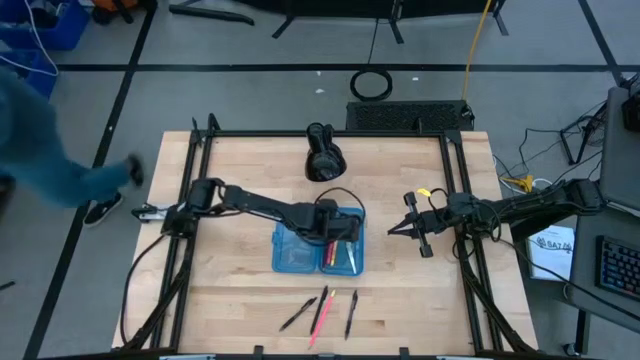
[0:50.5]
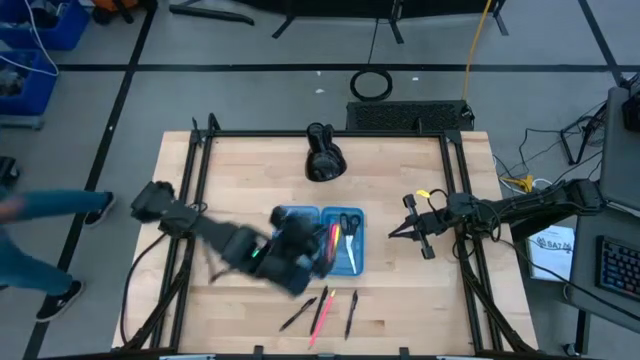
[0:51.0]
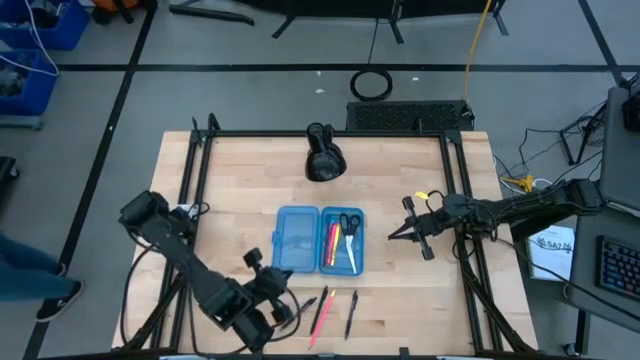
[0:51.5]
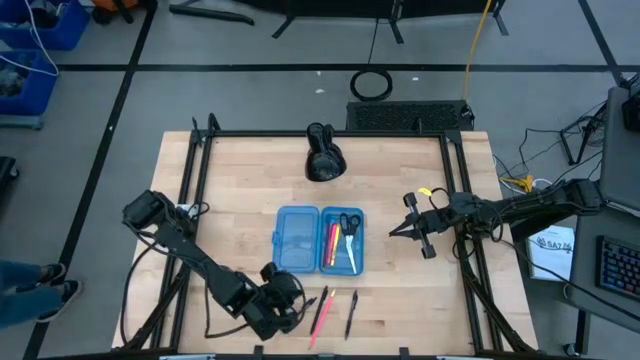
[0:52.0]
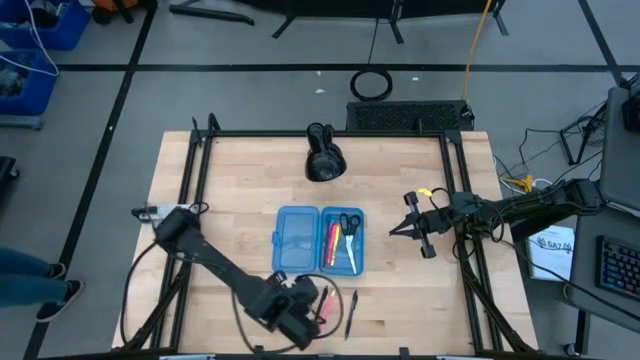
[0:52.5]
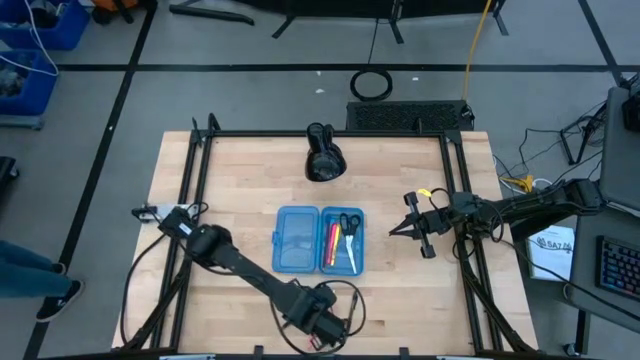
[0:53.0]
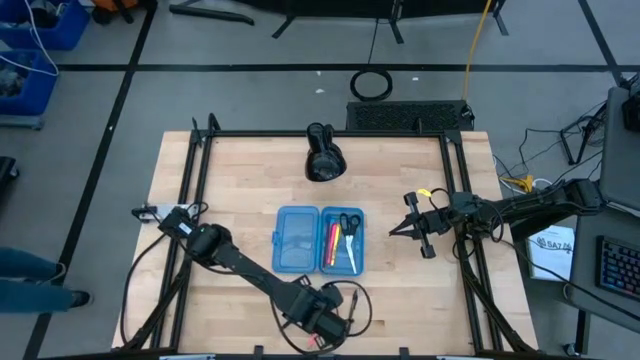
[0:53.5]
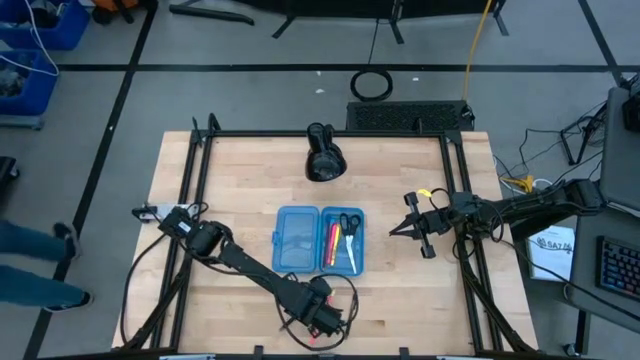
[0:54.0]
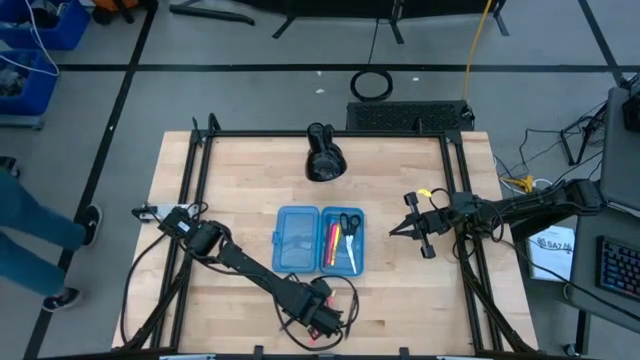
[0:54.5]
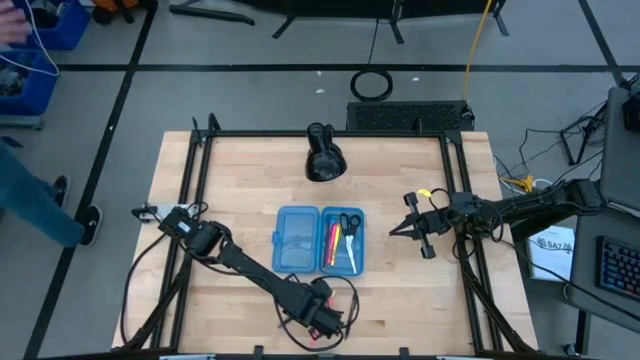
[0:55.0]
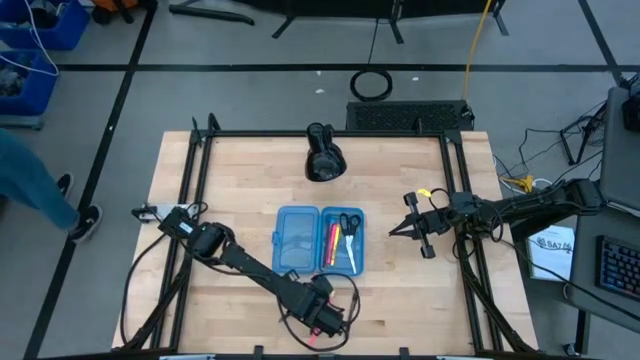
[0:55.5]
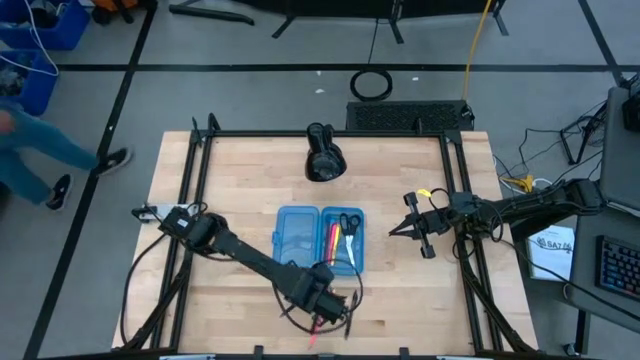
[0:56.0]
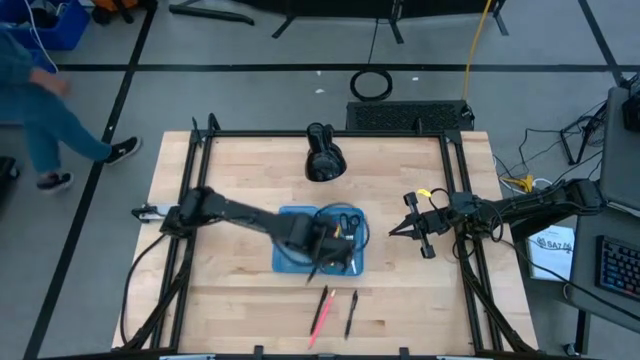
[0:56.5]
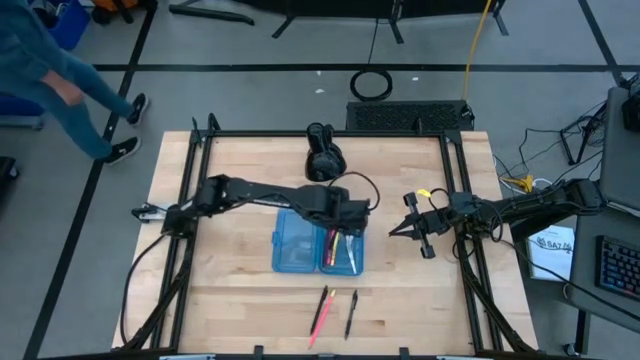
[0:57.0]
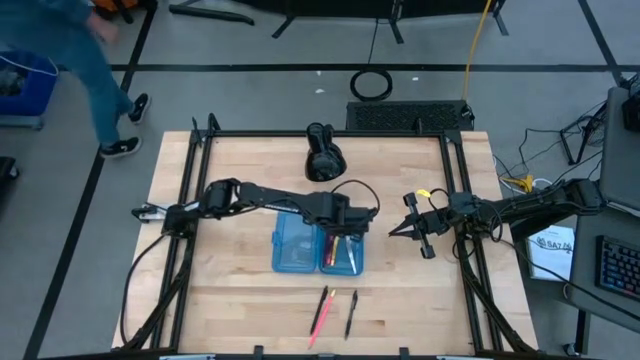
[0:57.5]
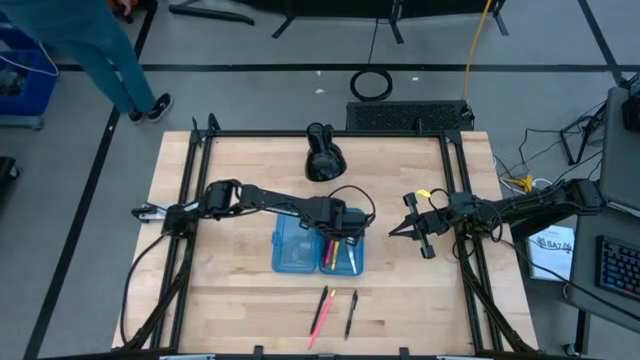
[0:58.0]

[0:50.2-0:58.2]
Task: Pick & place school supplies into a supply box
Put the left black pen into the blue supply box

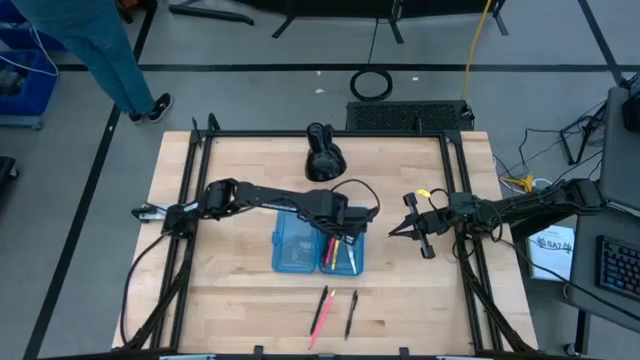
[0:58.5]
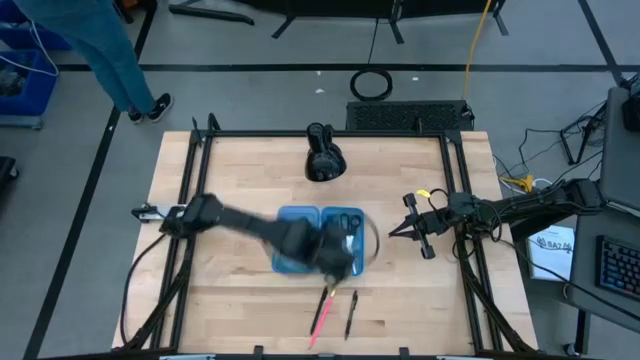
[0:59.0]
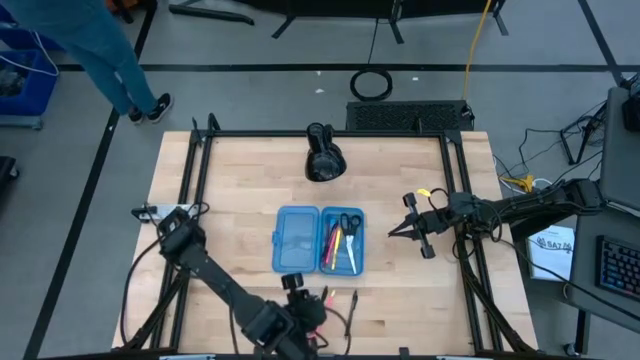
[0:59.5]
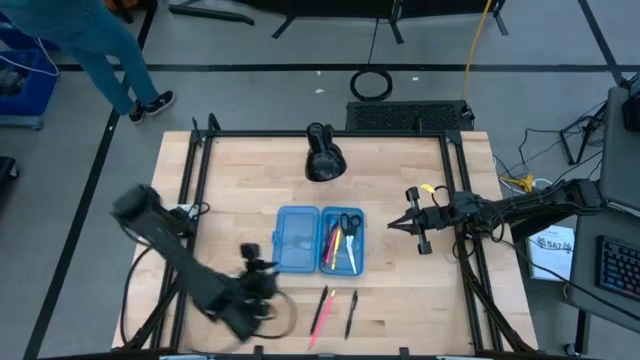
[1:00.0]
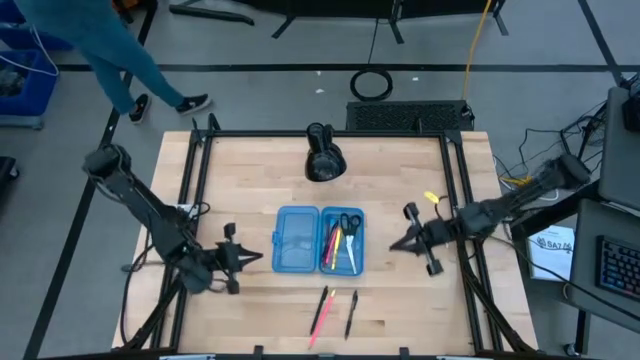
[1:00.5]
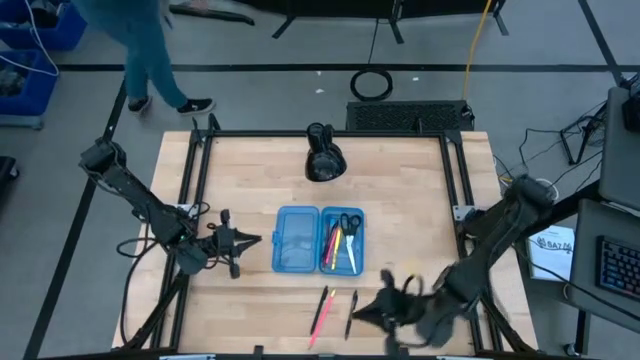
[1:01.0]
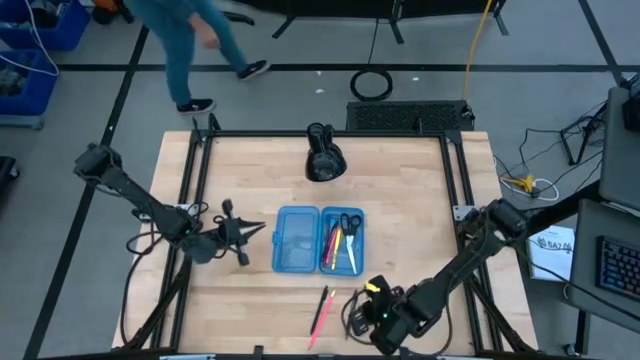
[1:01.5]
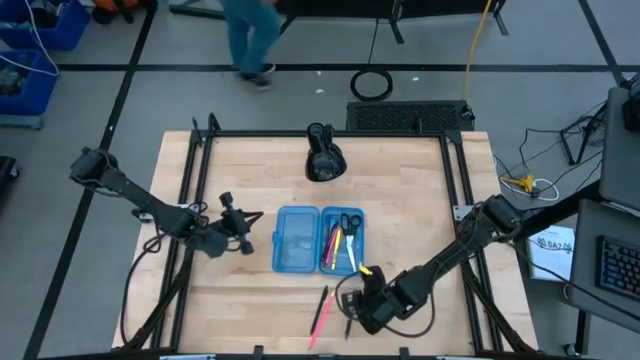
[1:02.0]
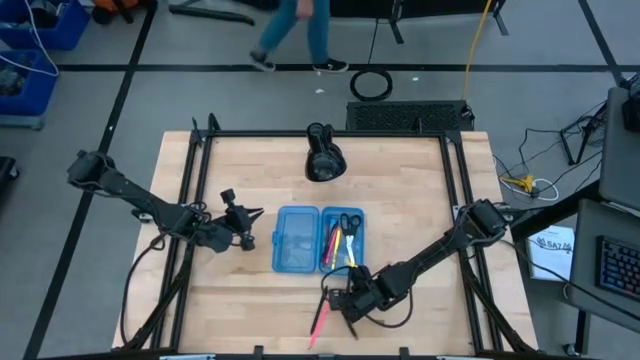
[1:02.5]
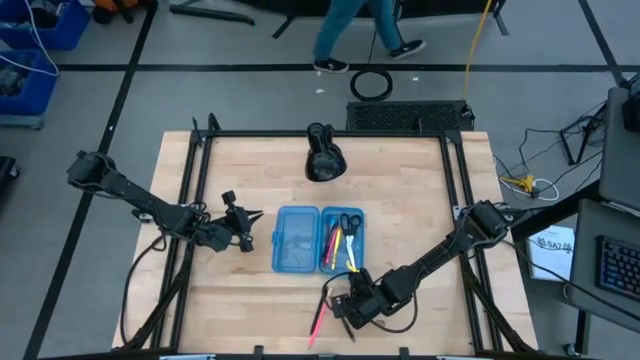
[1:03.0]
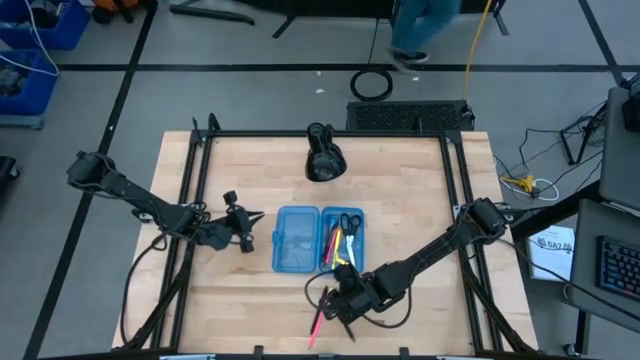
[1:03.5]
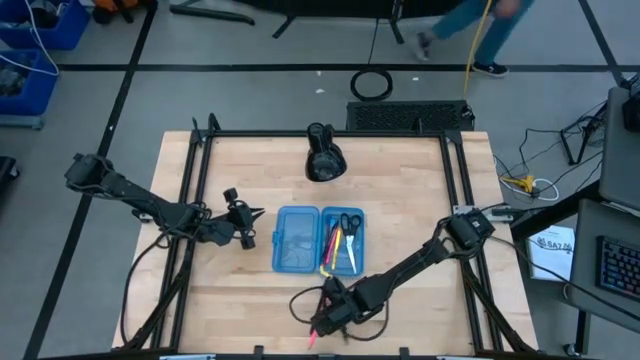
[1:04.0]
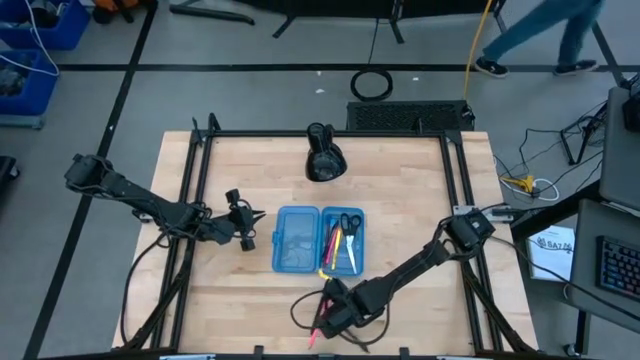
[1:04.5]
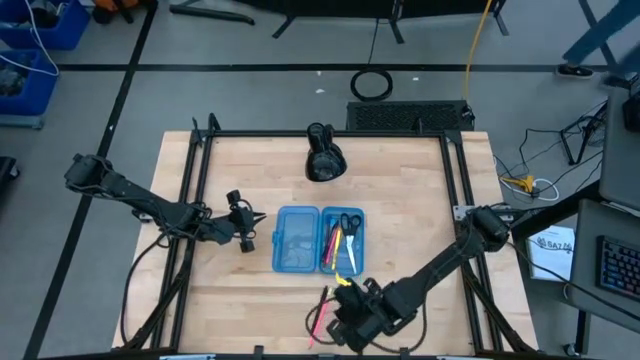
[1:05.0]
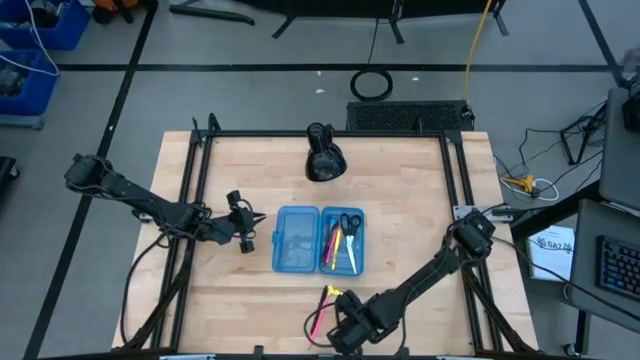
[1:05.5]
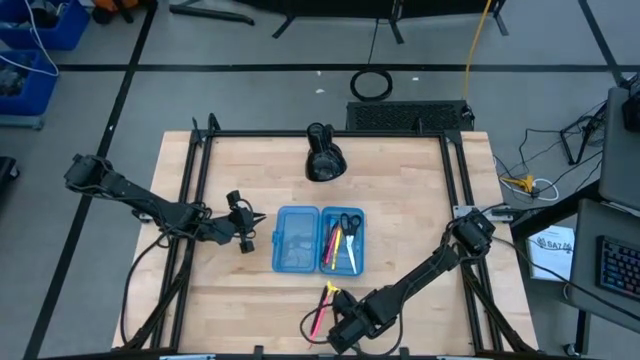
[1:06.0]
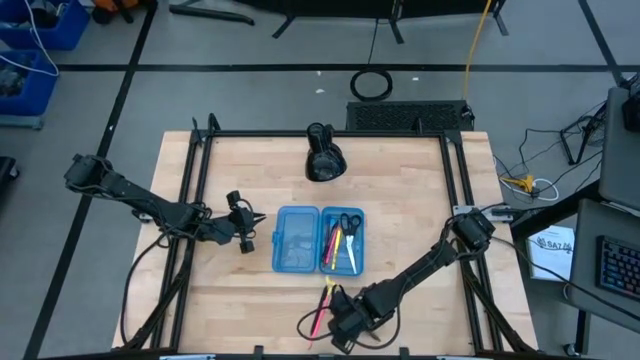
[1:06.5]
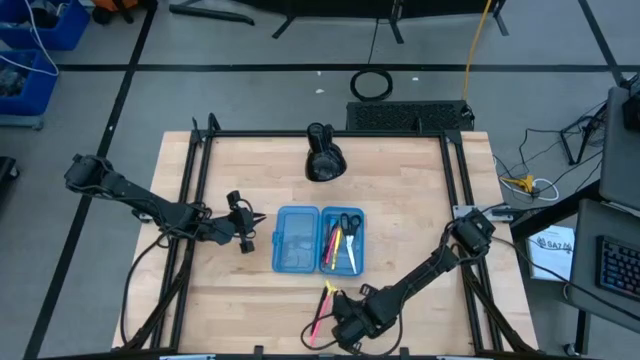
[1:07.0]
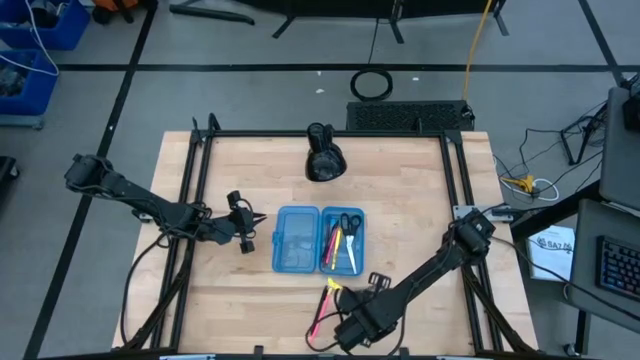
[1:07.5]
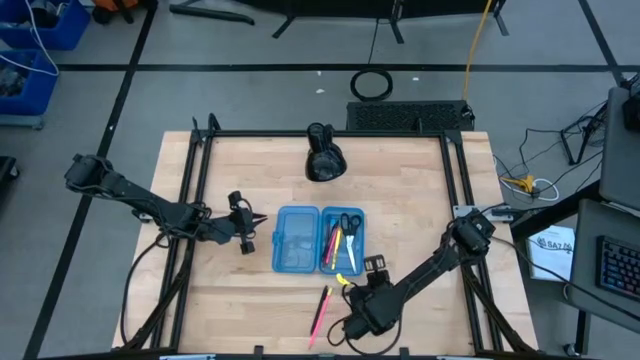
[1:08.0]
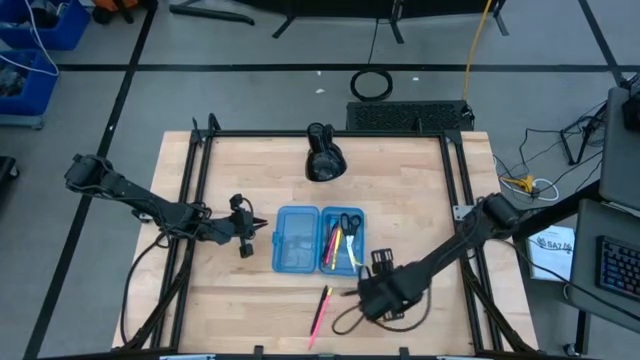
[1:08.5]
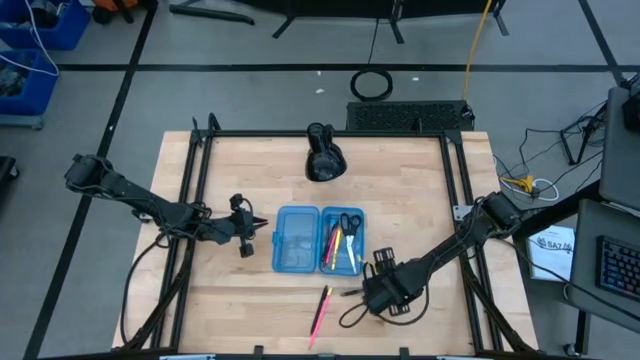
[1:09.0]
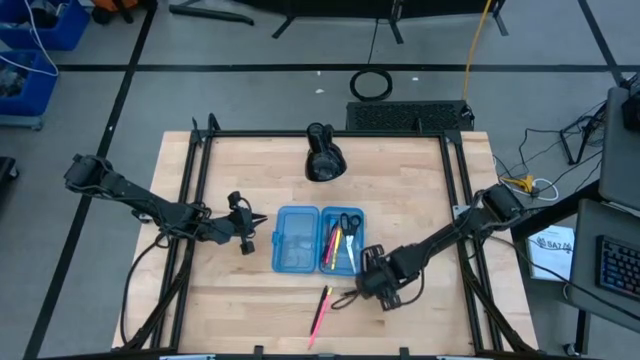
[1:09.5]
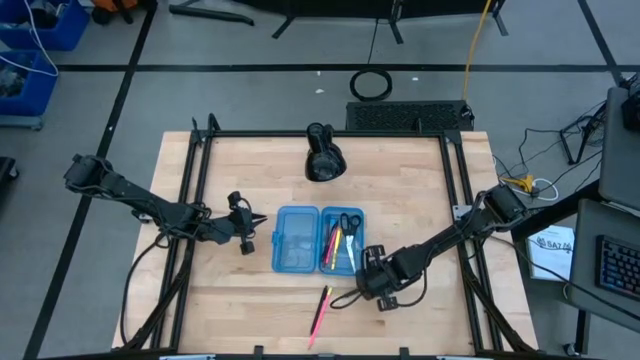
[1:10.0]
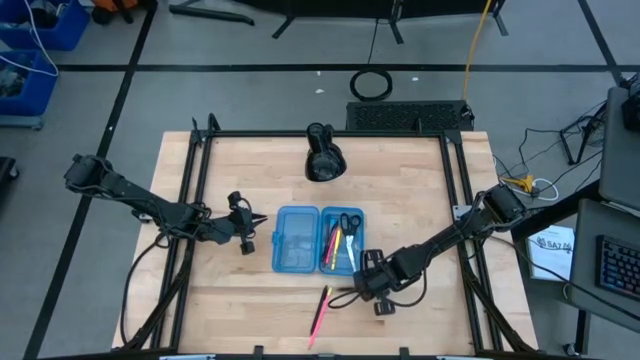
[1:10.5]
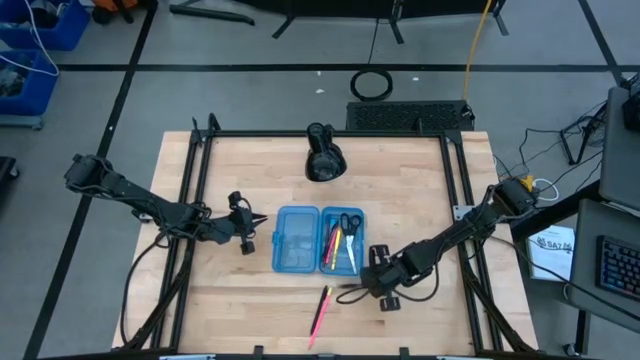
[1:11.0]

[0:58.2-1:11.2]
Put the right black pen into the blue supply box
